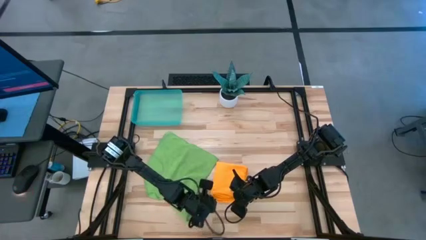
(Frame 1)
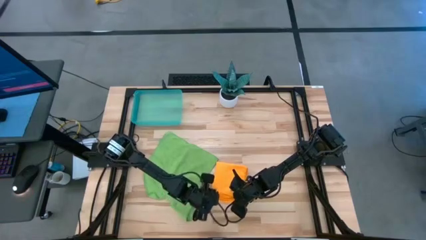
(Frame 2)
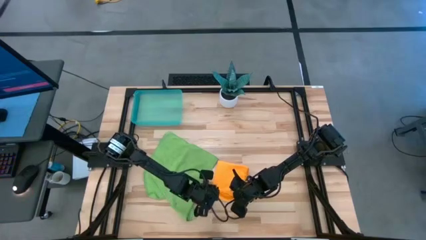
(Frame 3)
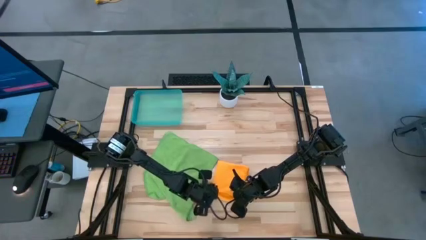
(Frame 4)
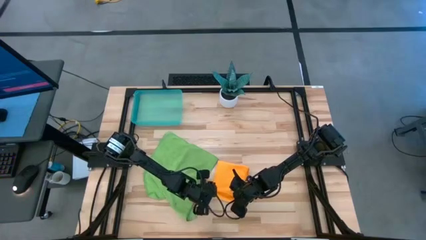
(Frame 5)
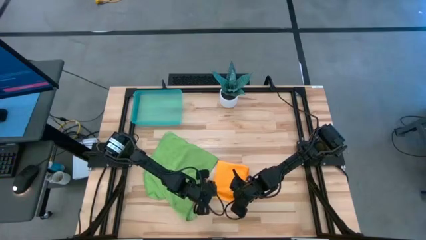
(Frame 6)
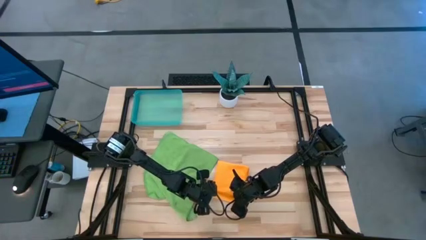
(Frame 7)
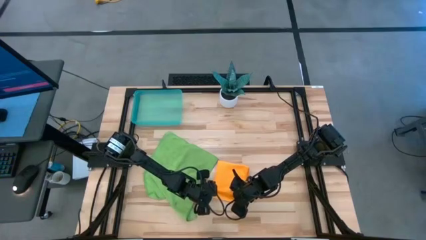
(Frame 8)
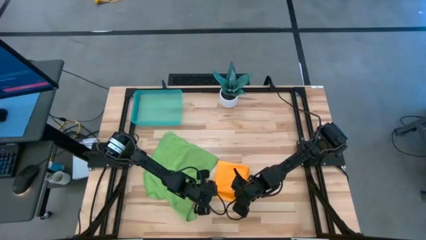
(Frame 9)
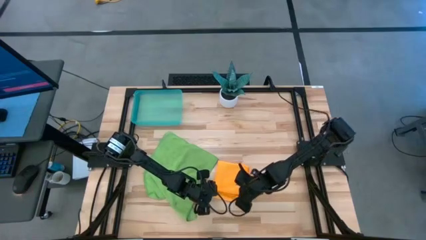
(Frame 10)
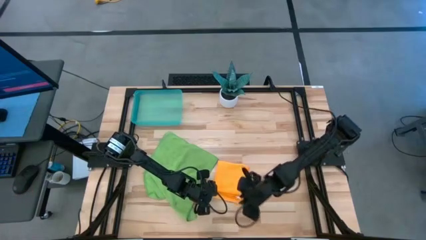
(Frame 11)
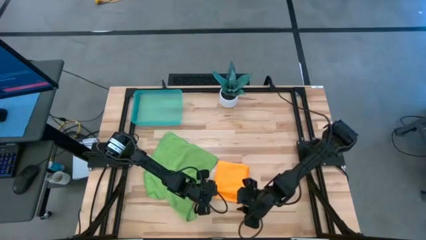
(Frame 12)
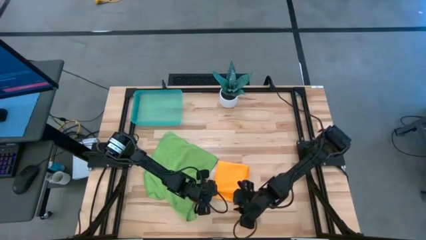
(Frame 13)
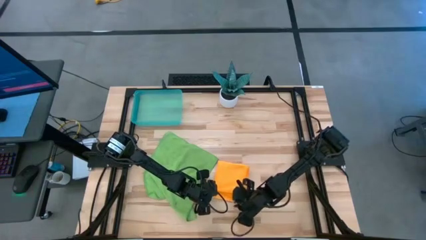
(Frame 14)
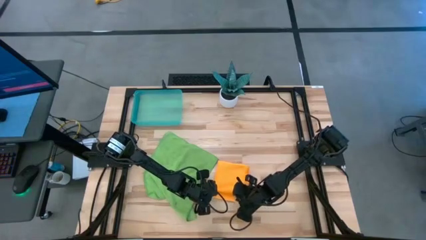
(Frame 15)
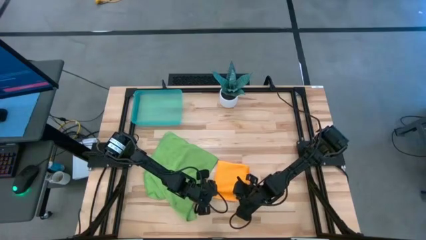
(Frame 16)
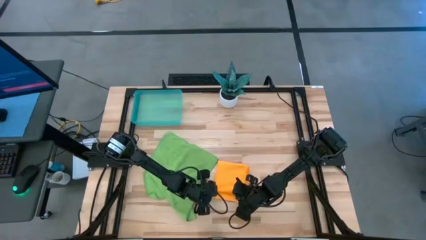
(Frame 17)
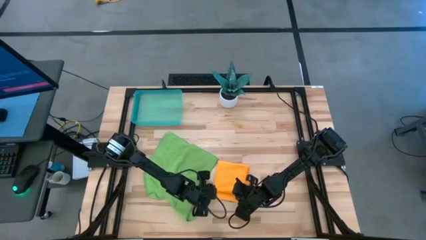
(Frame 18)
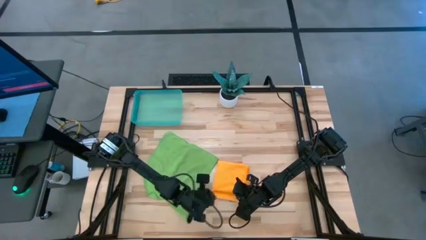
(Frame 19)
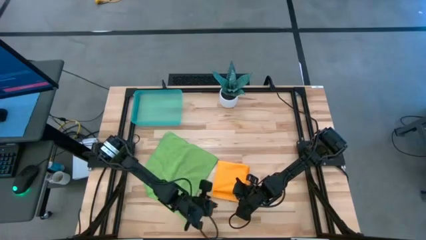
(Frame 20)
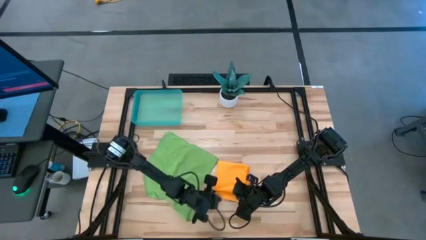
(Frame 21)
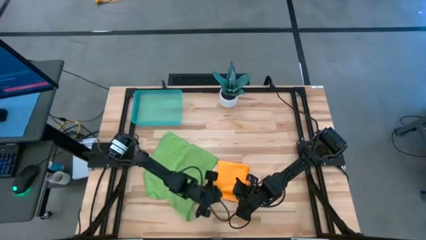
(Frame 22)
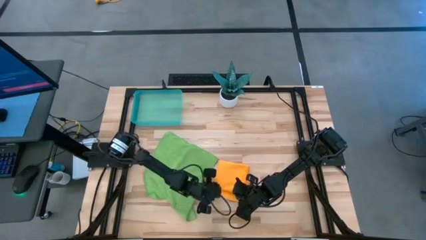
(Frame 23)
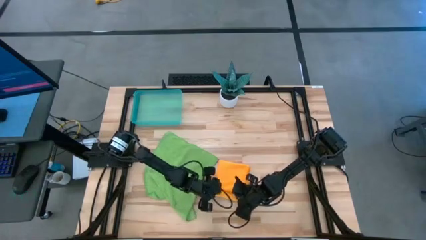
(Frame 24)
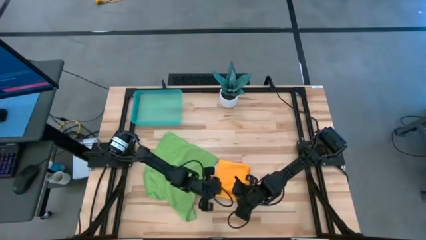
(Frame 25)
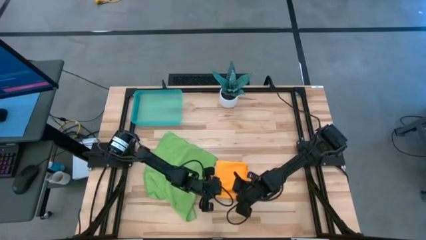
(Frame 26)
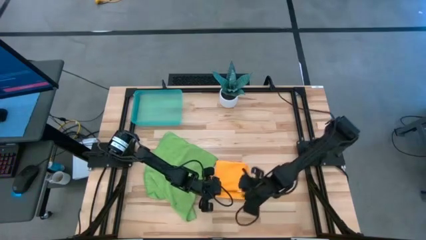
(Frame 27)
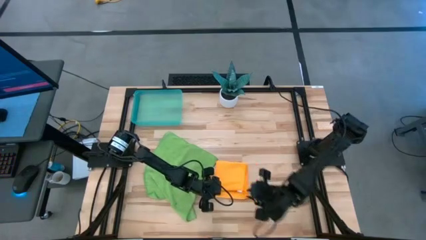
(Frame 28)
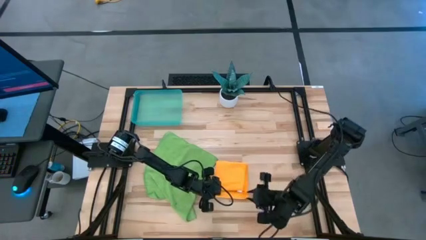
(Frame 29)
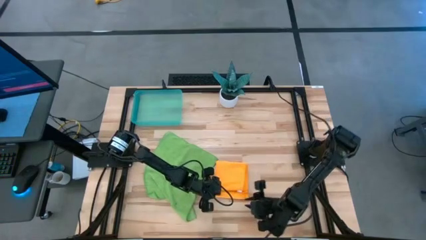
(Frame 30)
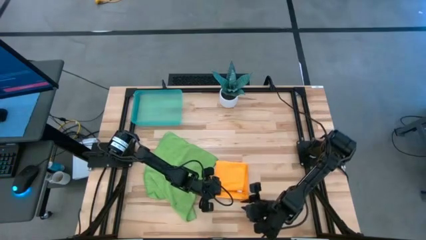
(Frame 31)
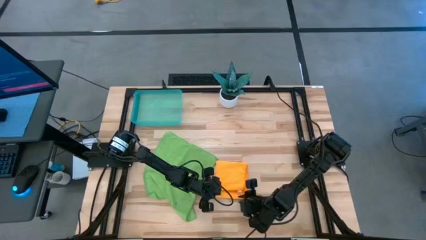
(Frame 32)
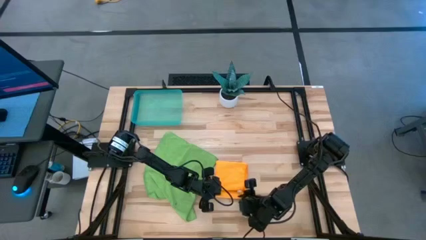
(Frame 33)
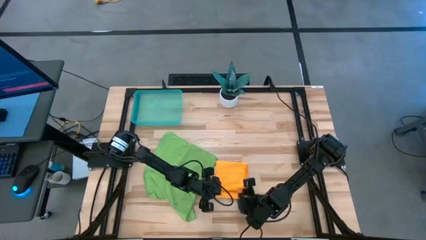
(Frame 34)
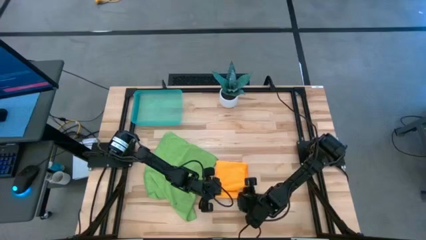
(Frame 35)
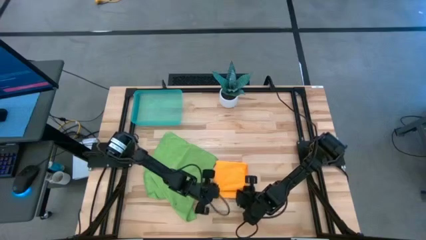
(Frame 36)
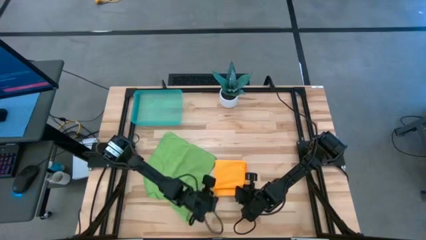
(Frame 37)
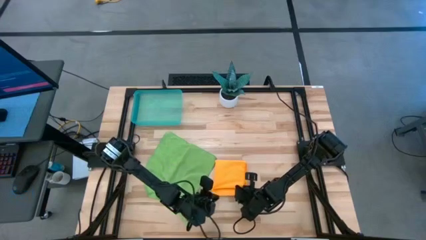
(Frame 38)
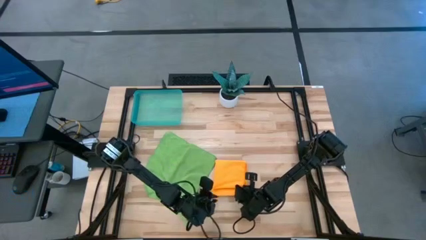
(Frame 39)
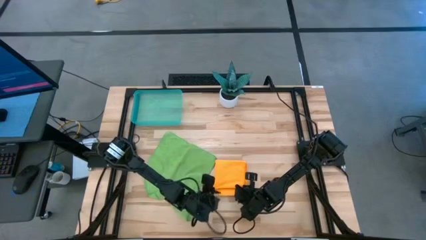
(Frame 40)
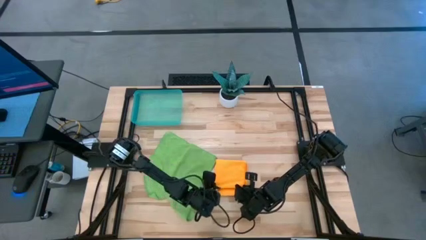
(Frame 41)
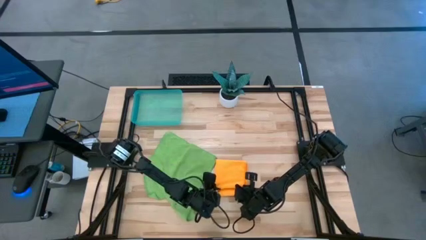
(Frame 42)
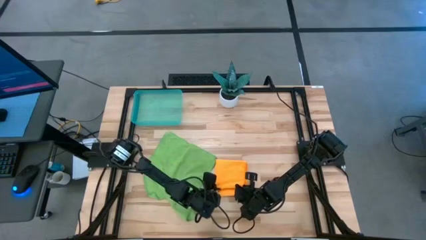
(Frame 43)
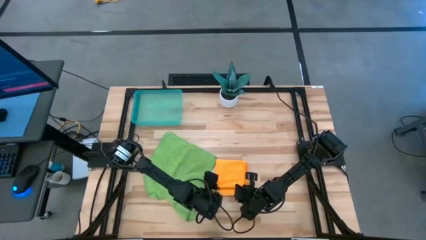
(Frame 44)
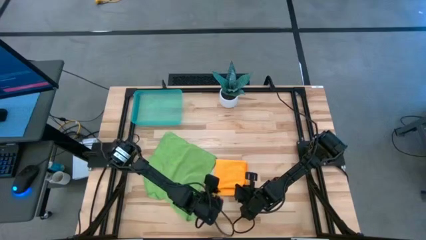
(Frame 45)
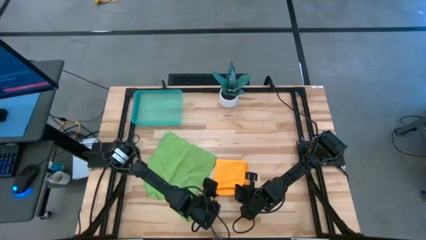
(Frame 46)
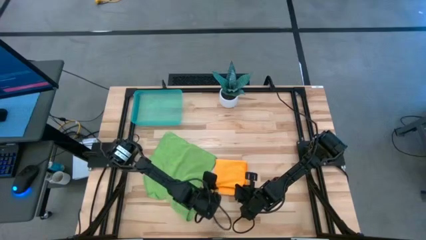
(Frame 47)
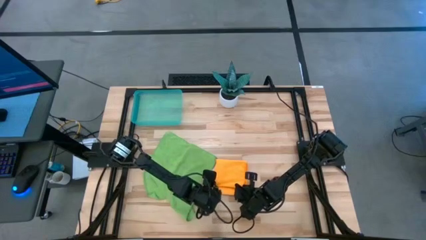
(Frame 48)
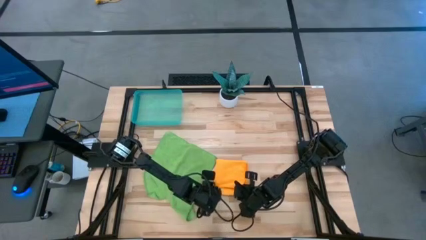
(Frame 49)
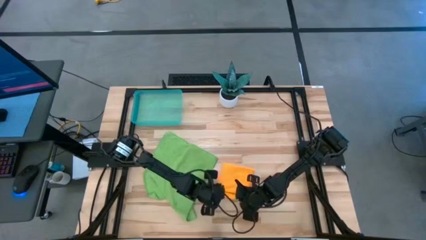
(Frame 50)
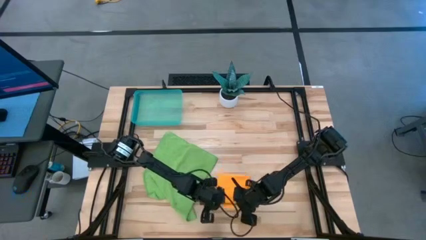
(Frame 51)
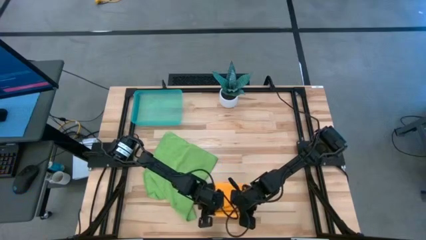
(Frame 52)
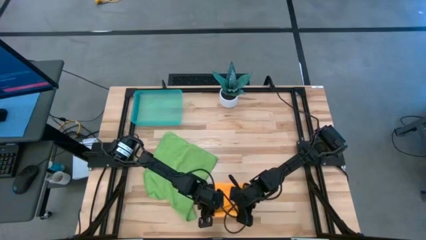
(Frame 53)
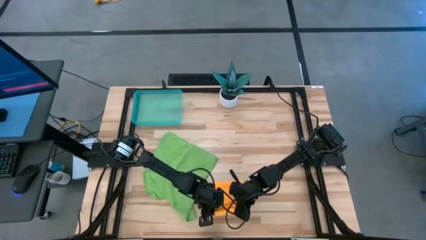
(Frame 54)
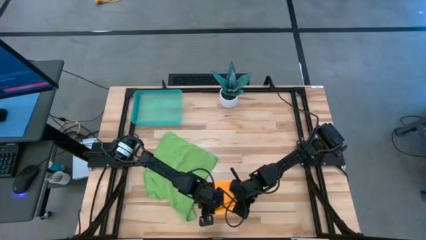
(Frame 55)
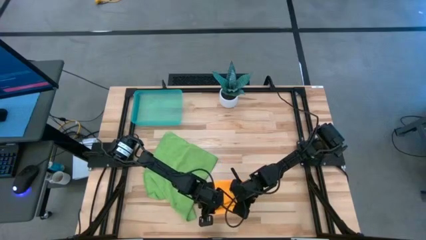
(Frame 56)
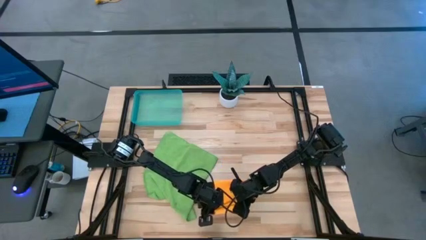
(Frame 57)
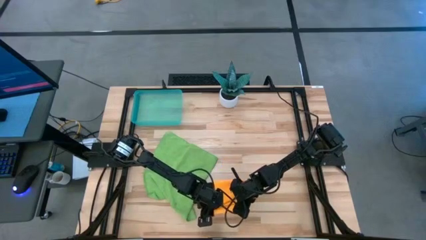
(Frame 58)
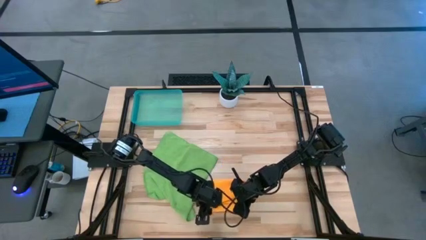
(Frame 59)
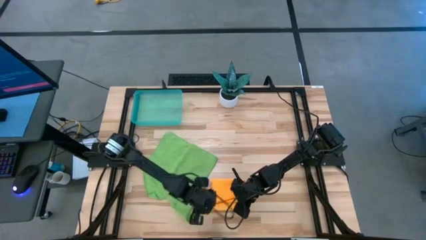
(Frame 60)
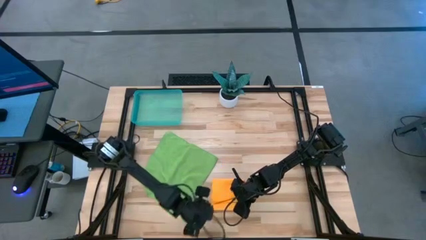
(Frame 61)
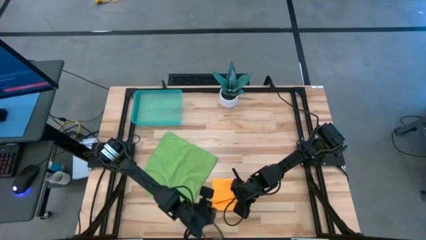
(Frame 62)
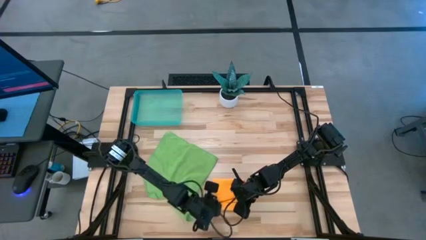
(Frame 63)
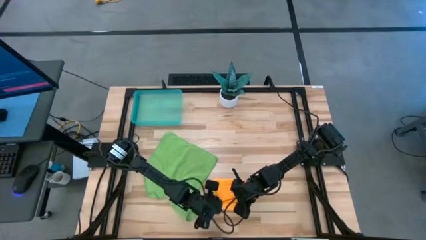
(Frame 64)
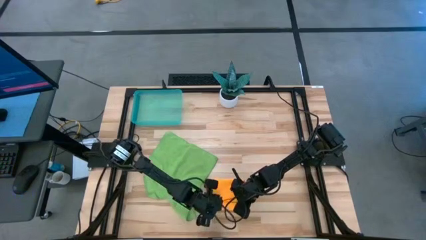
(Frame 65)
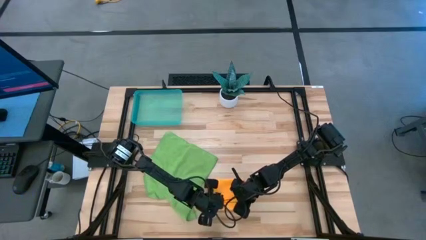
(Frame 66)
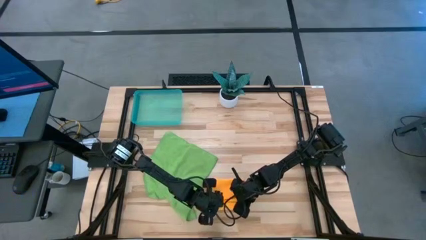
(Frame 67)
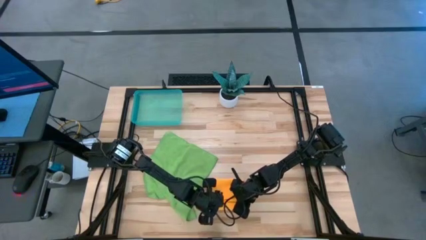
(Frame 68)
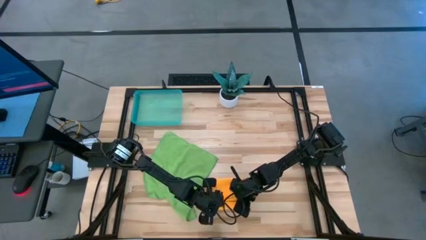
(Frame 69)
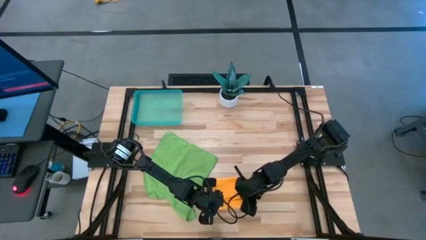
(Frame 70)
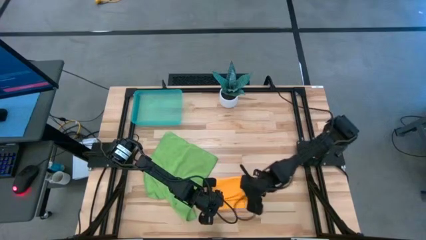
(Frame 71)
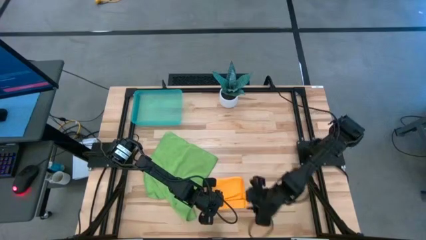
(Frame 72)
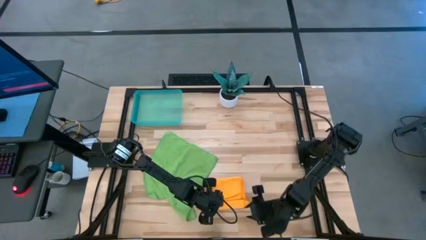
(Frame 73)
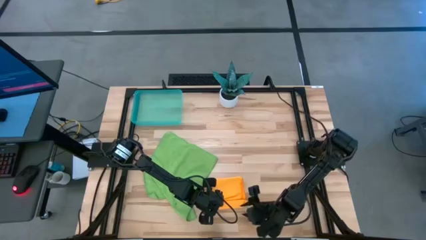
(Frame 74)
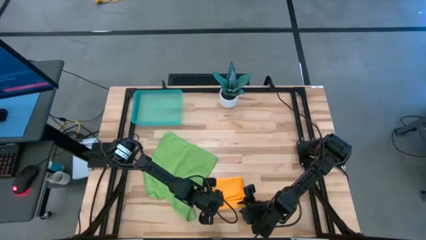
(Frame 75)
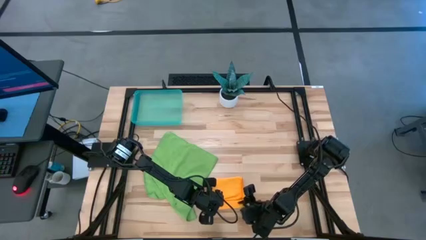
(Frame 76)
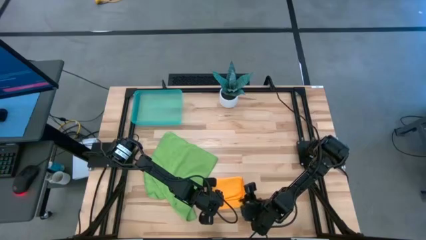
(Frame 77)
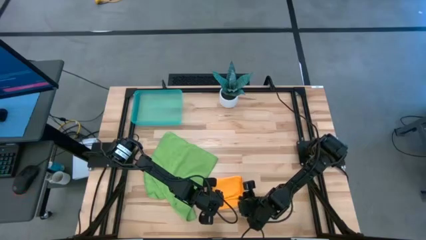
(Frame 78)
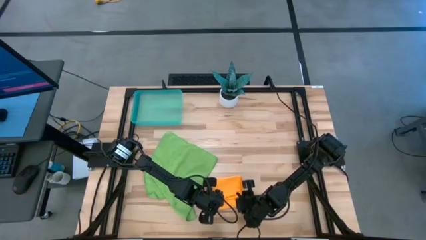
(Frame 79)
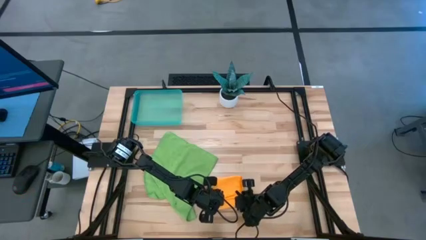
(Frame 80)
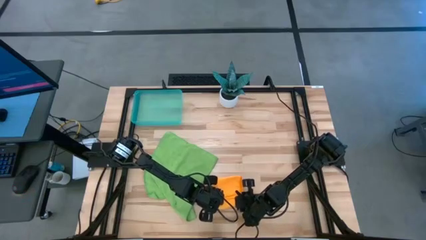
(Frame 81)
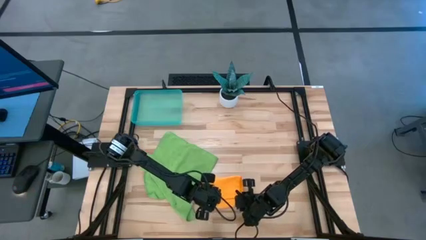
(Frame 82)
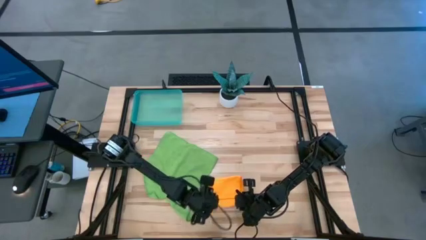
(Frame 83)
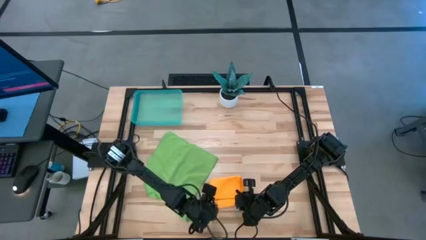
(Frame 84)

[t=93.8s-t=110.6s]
Task: Roll microfiber towels into tight, uniform cylinder then place into a basket
Roll the yellow microfiber cloth

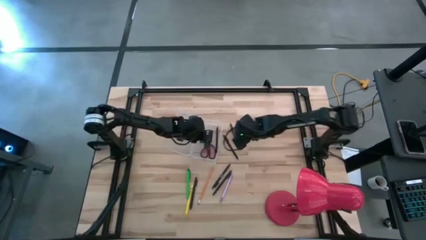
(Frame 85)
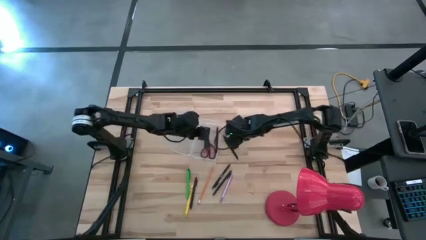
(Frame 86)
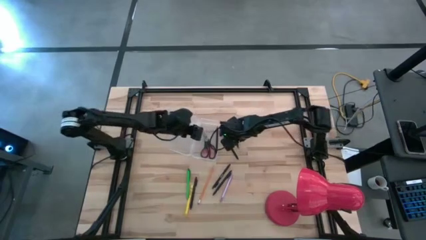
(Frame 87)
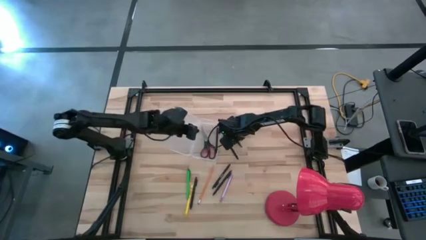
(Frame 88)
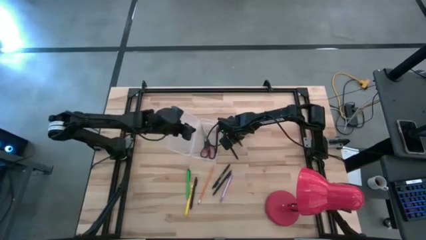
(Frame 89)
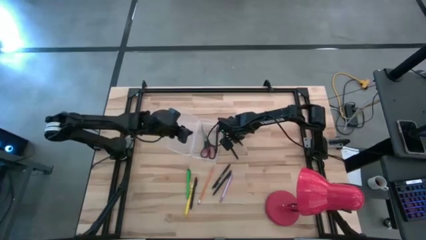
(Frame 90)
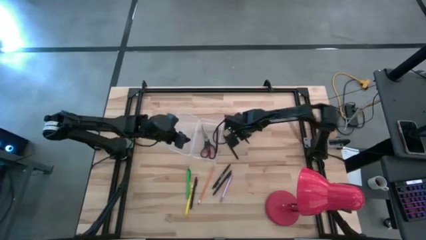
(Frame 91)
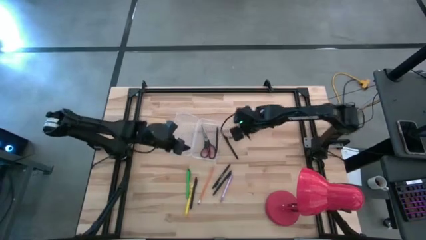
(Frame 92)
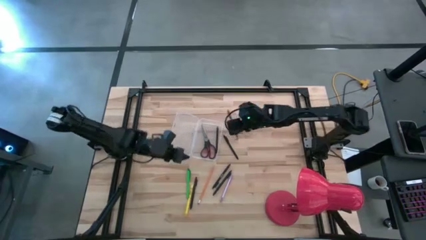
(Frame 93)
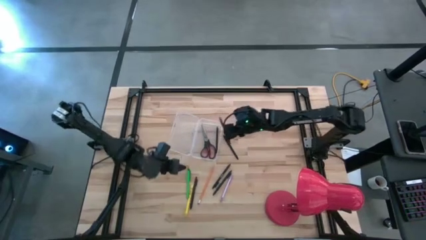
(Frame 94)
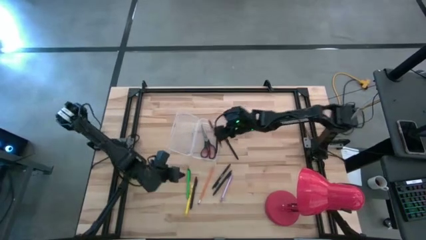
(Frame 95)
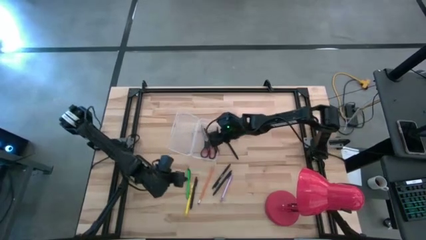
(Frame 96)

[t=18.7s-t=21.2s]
Task: Pick & place school supplies into a supply box
Put the brown pen into the transparent supply box
